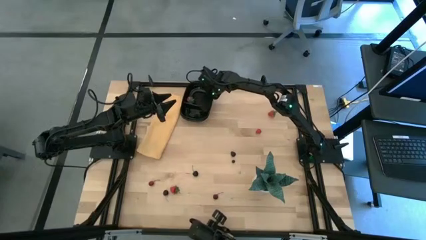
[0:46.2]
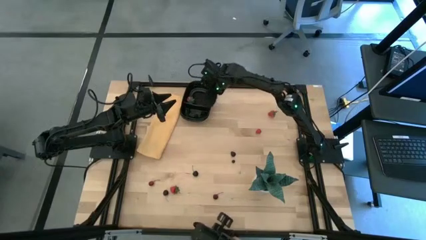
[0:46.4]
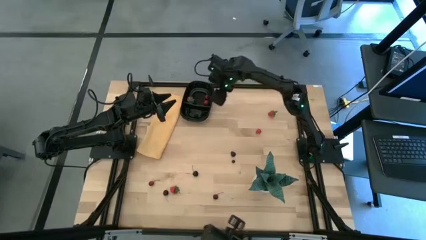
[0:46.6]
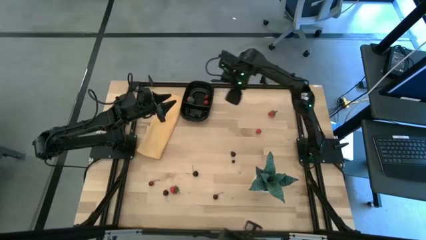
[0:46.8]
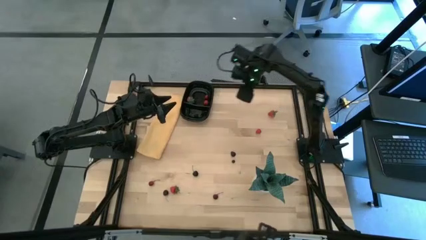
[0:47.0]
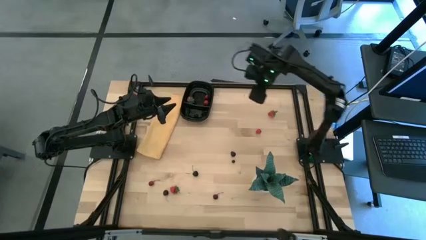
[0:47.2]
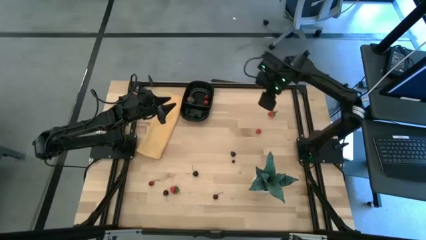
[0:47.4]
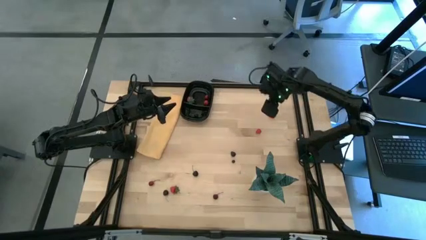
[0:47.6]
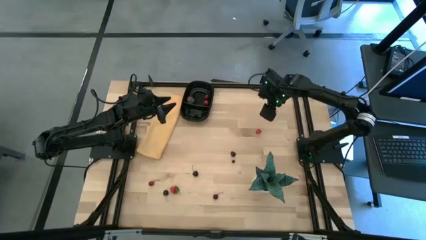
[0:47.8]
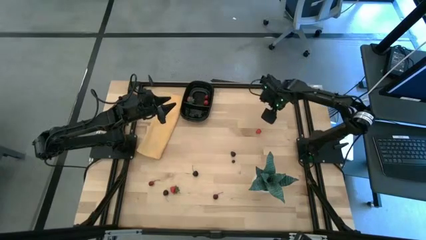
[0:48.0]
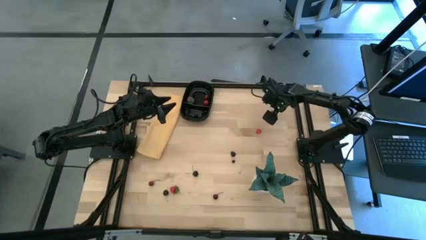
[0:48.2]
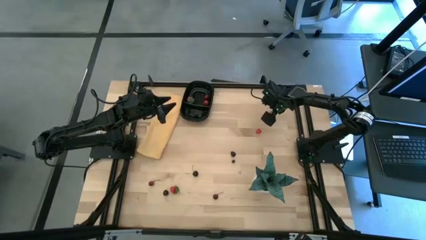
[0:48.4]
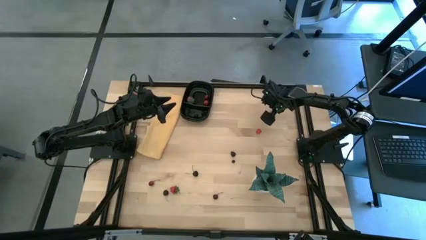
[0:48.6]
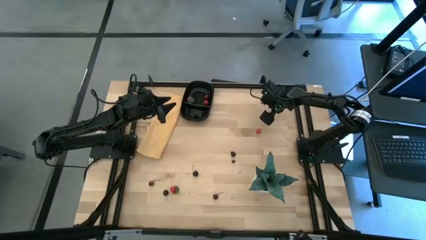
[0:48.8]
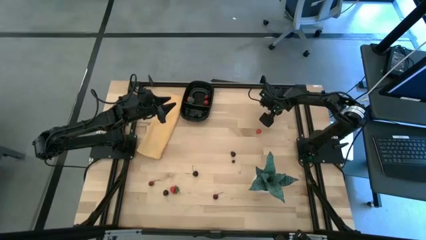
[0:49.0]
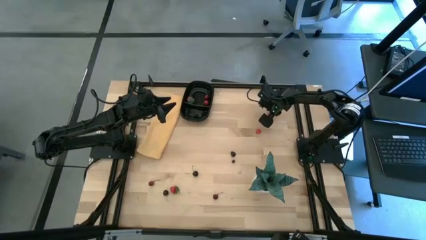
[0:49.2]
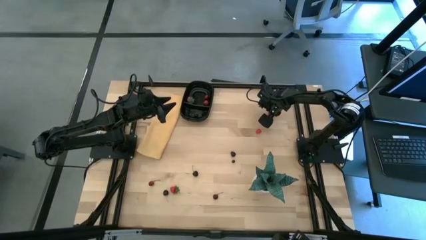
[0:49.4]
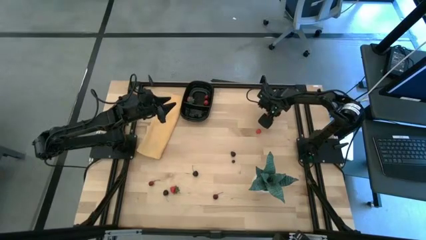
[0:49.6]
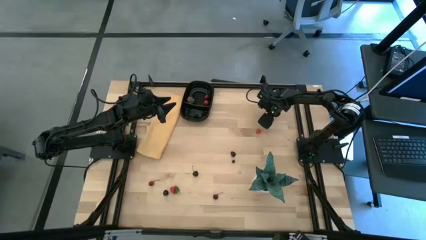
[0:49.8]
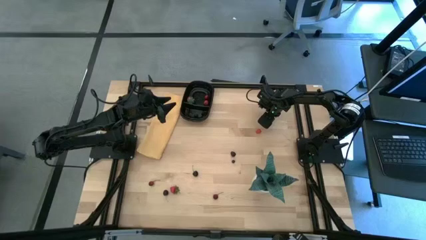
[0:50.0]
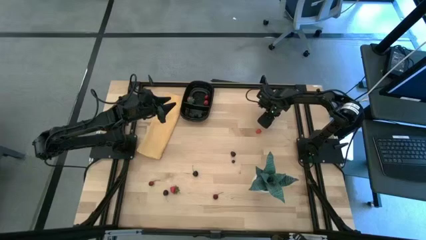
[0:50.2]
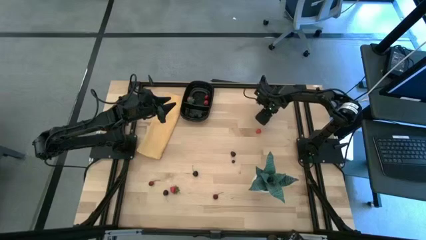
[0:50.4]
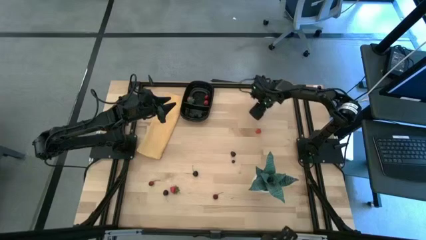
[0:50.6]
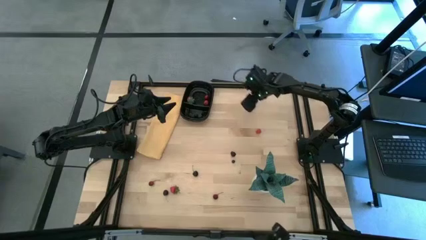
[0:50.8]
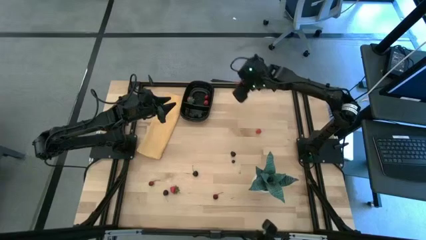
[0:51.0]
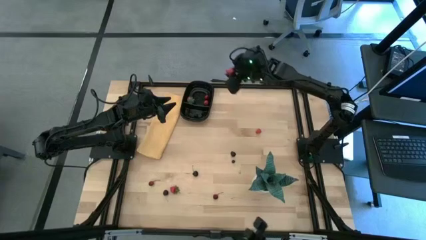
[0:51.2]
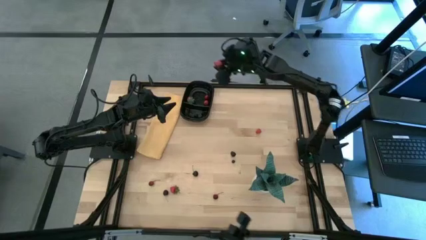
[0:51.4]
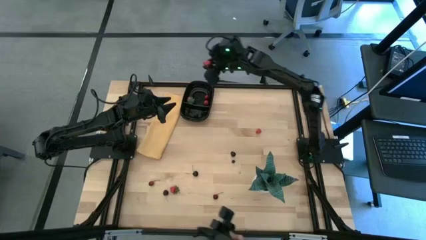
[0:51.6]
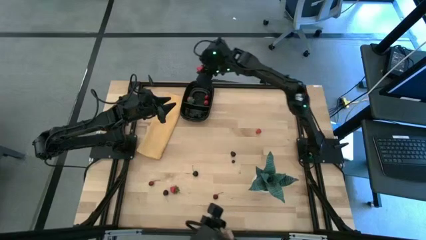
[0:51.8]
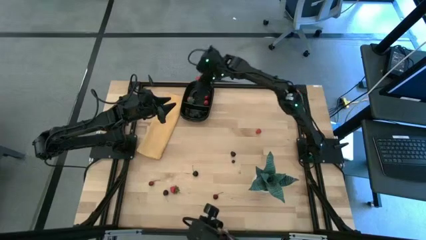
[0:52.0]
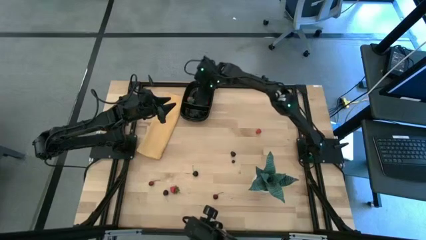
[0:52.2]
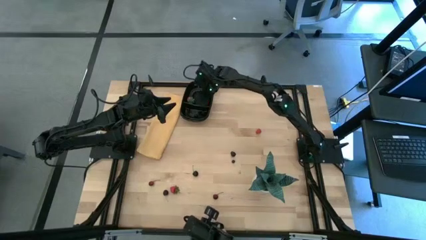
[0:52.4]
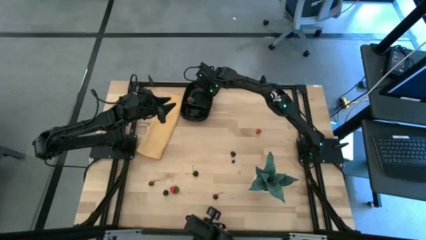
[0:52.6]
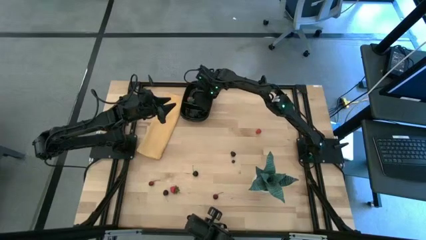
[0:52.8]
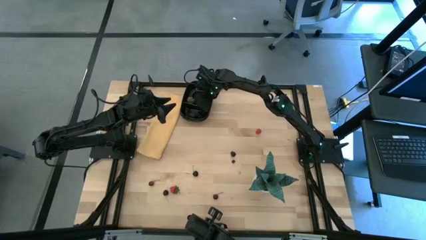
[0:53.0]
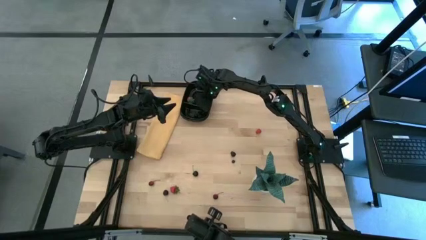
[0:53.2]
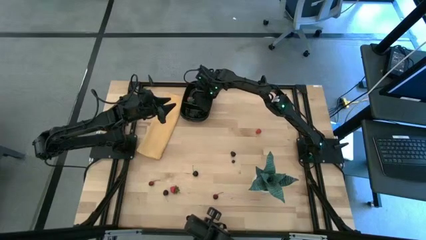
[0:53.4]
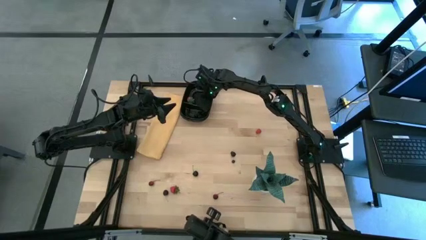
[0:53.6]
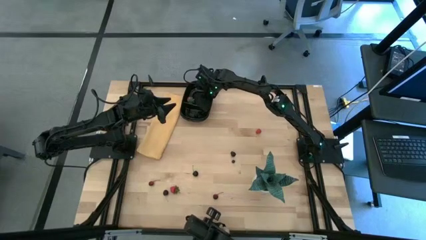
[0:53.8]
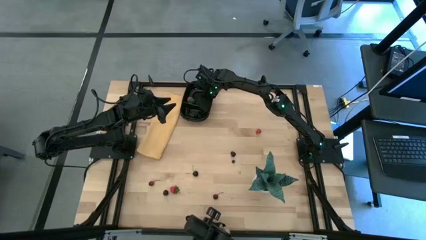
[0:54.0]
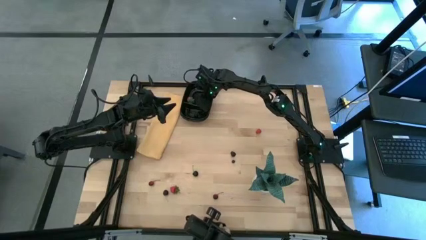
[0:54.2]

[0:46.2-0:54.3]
Task: Pick and placing Produce into tupperware
Put the top red strawberry into the black bin

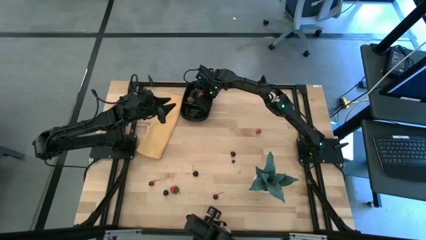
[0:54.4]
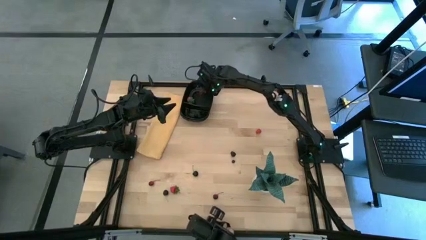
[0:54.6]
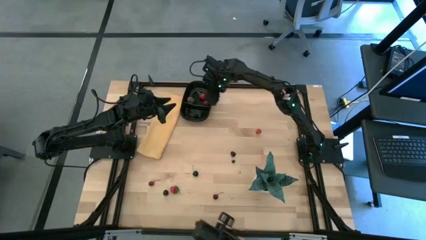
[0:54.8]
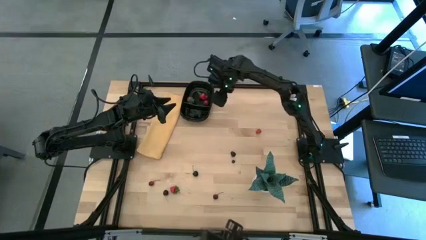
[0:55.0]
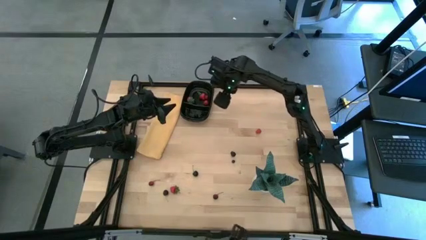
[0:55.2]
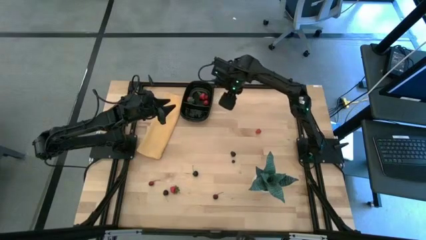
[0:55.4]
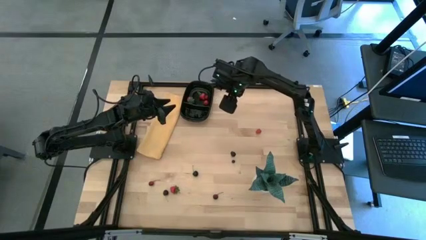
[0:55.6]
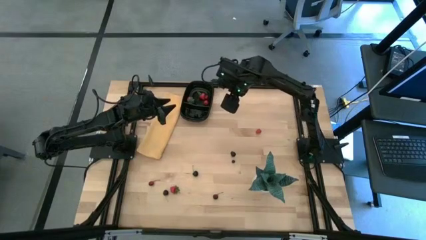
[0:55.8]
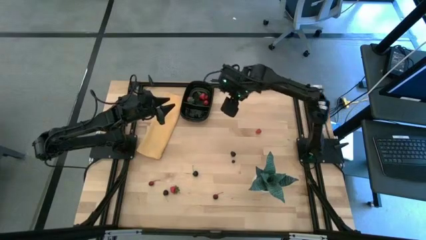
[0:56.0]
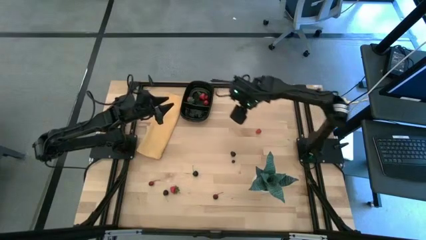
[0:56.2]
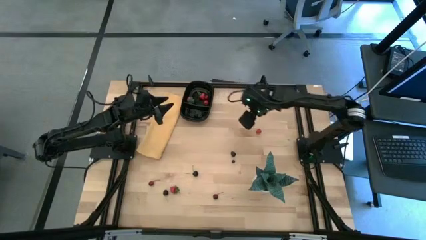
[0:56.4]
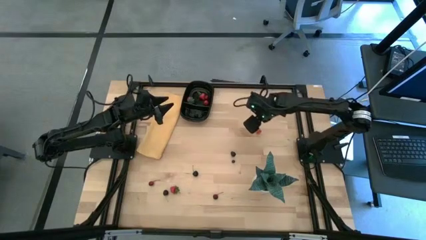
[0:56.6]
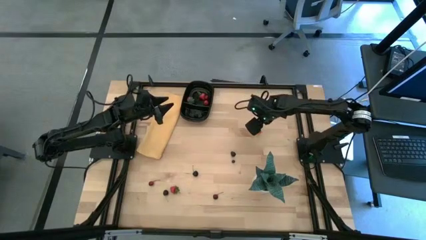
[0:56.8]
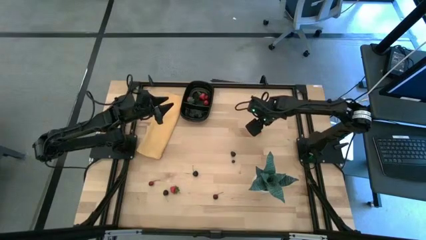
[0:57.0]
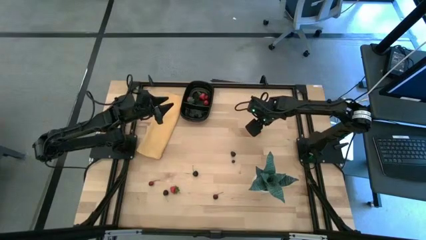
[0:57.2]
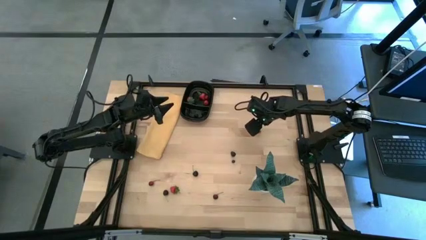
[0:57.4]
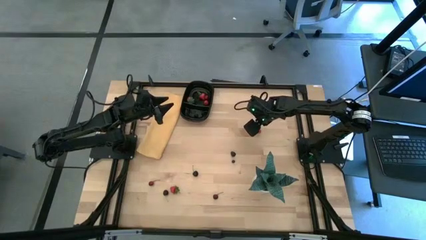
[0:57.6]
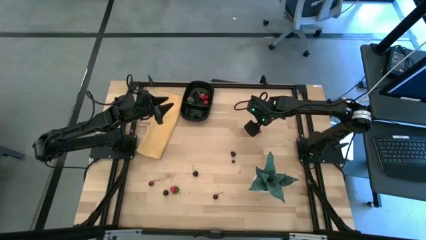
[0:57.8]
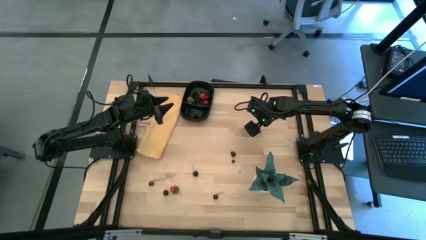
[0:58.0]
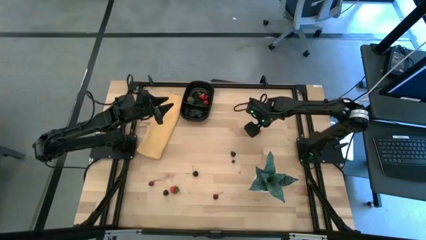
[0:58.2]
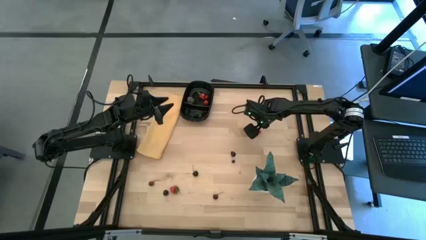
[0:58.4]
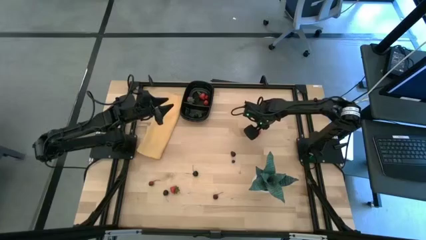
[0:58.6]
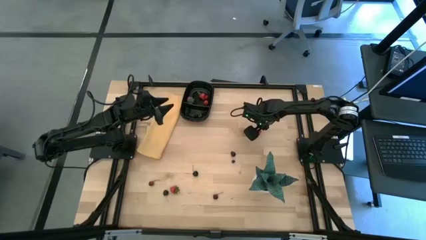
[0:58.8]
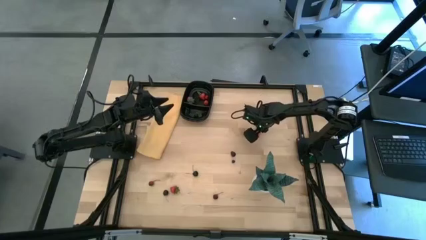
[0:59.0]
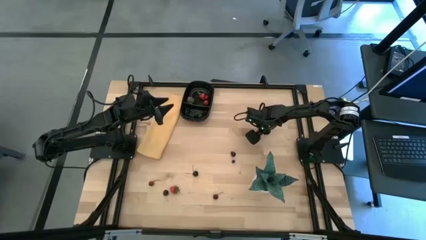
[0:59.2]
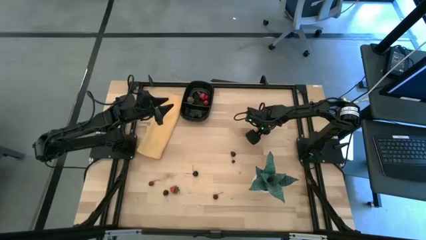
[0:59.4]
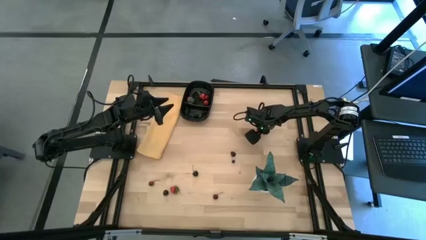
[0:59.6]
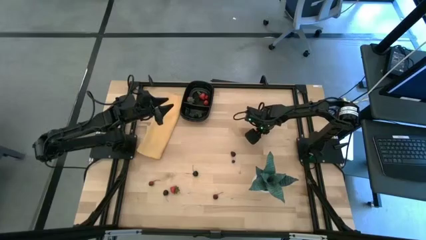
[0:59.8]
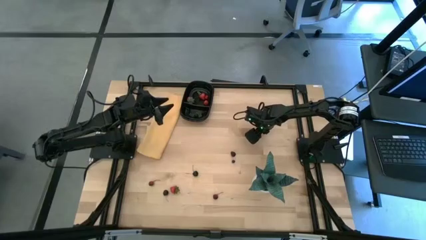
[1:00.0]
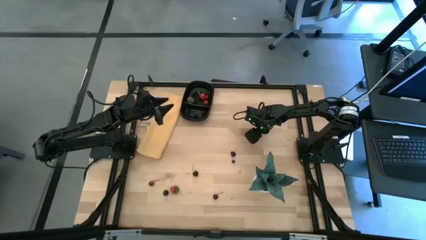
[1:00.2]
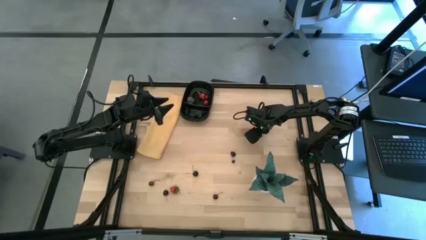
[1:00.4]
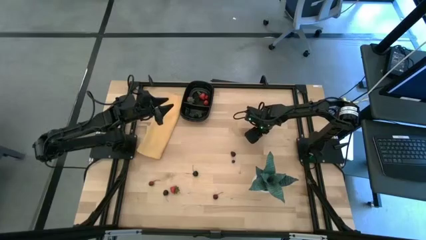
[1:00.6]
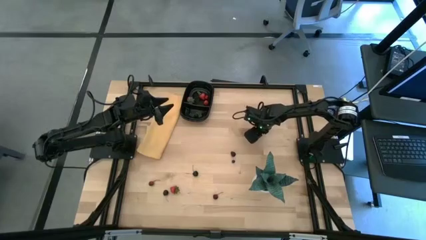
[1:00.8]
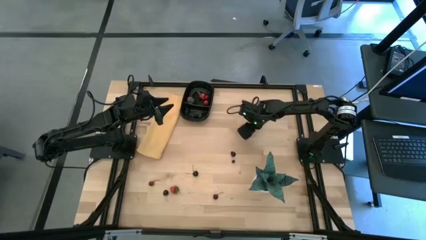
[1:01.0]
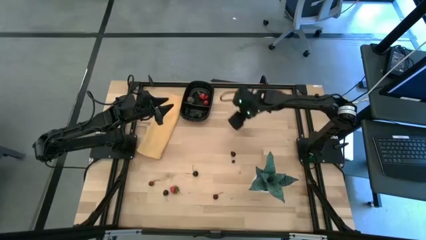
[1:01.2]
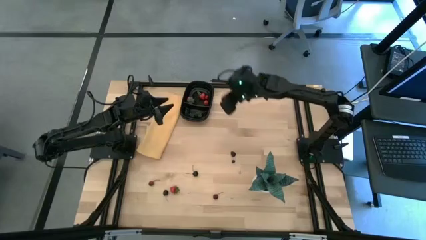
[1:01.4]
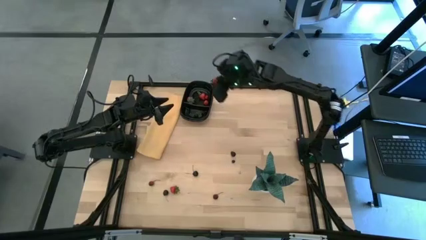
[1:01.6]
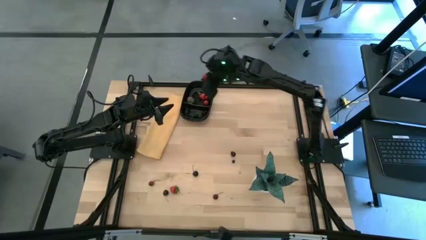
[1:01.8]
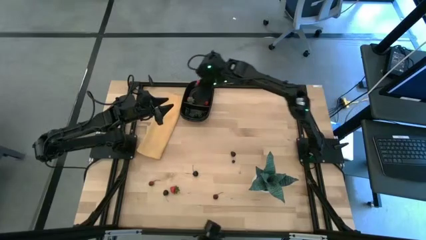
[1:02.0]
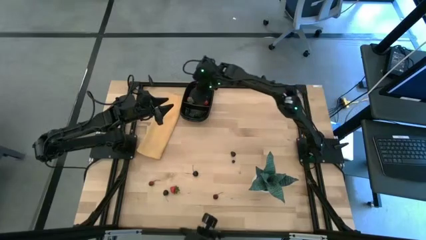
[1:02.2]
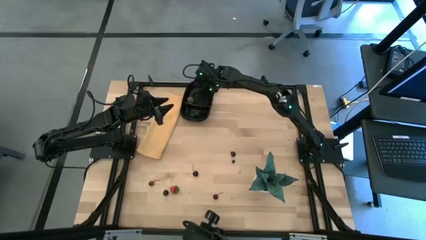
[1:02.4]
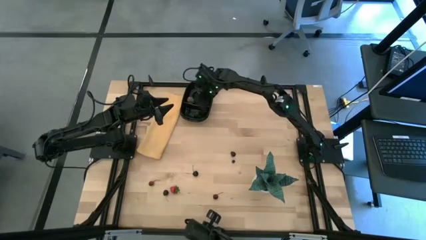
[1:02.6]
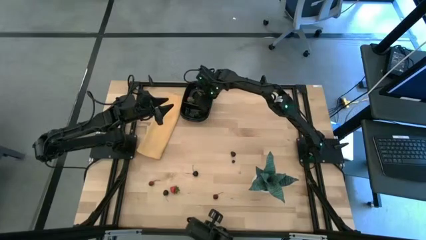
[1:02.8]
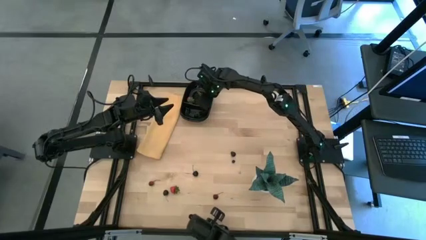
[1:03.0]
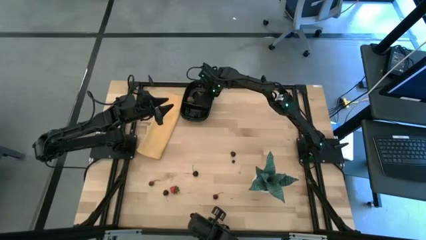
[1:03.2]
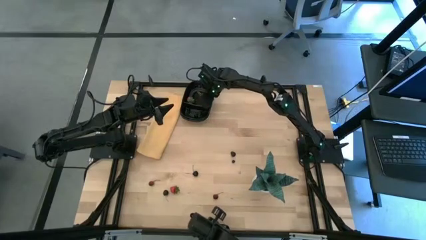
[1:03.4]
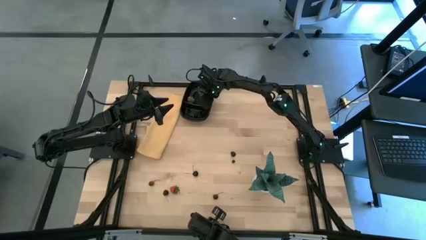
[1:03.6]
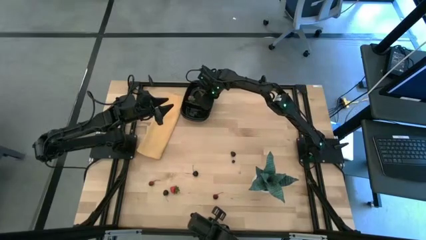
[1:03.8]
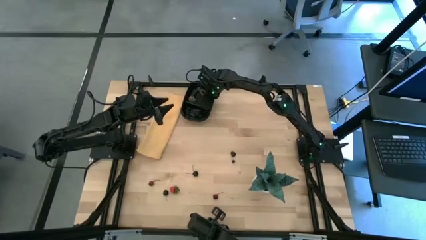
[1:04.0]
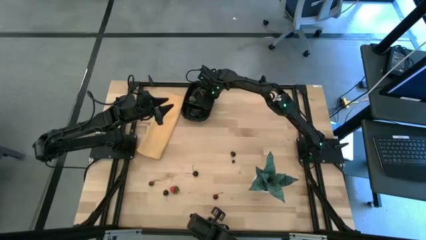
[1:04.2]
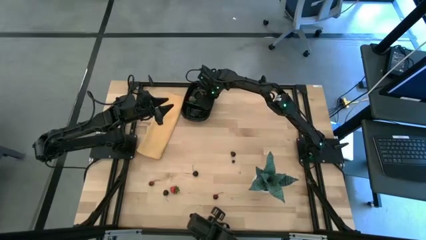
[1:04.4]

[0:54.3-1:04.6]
Put the red raspberry into the black bin
